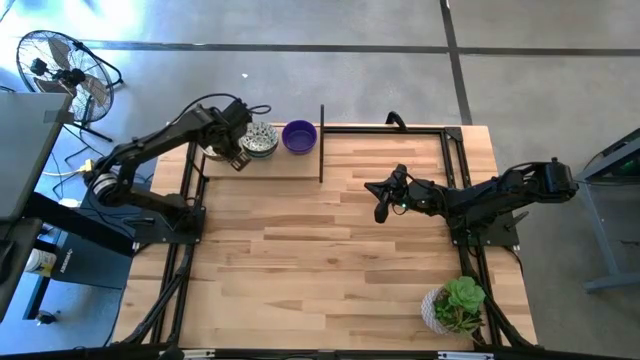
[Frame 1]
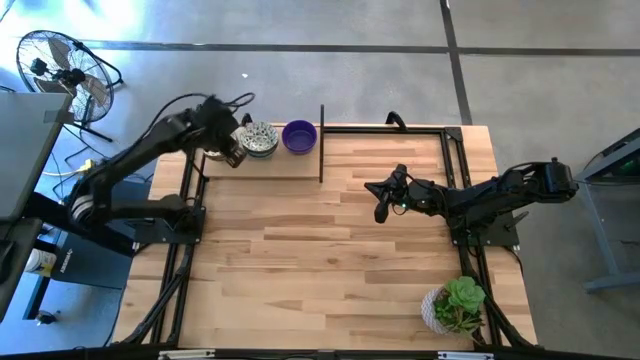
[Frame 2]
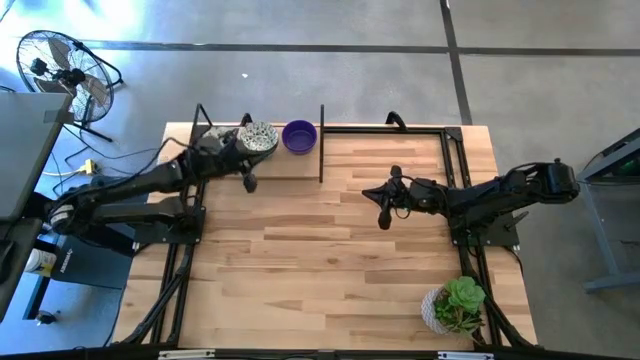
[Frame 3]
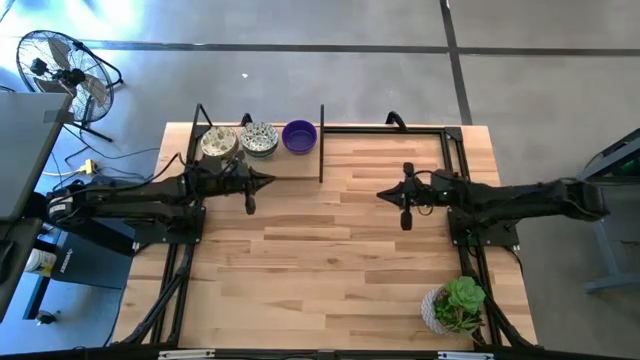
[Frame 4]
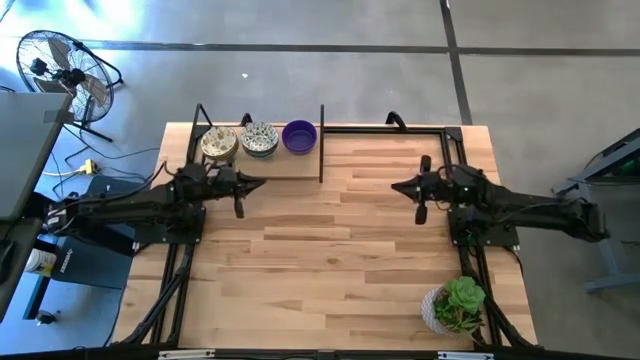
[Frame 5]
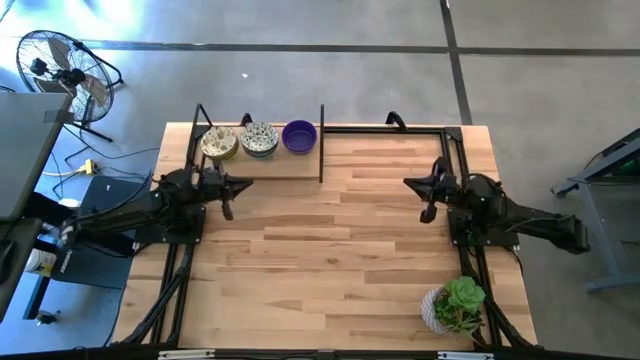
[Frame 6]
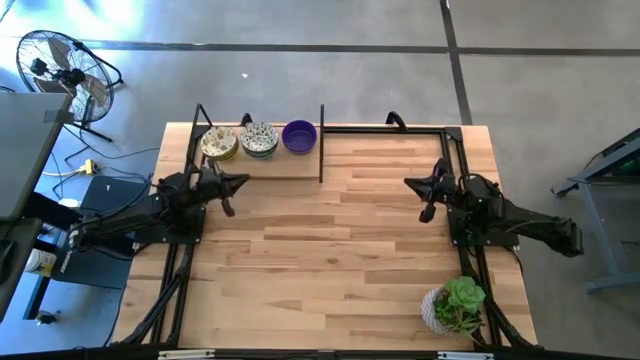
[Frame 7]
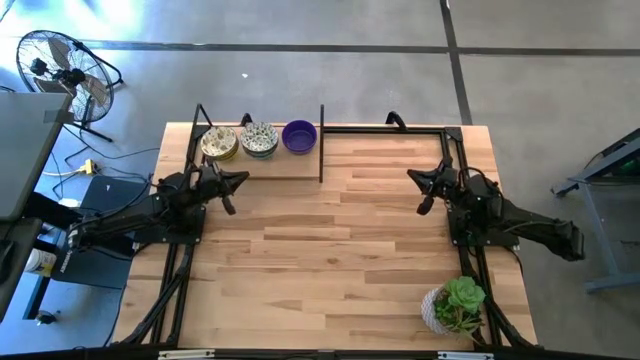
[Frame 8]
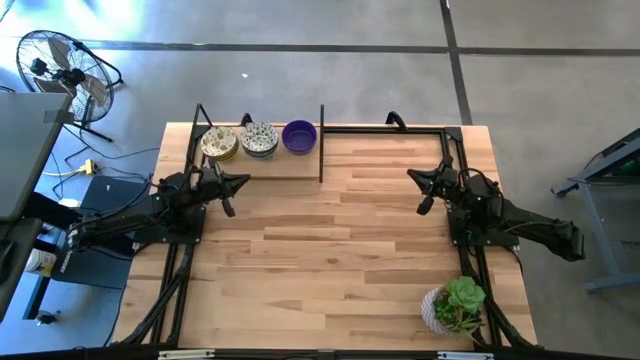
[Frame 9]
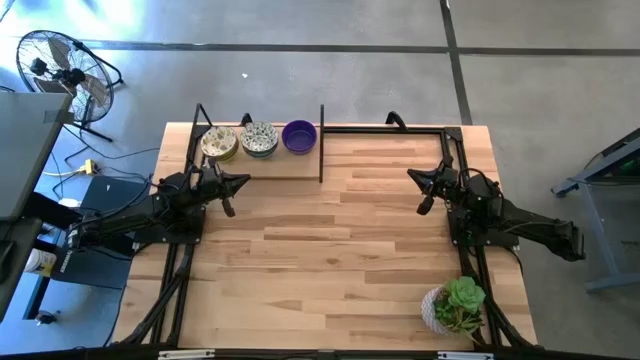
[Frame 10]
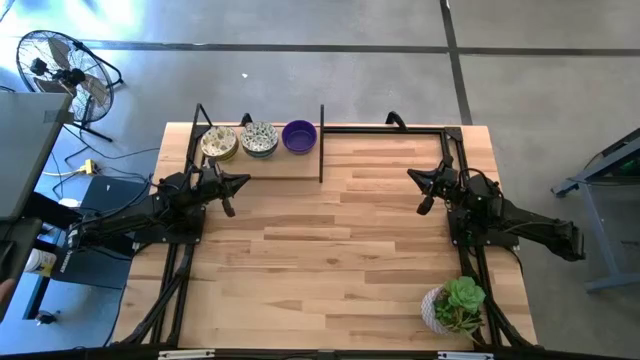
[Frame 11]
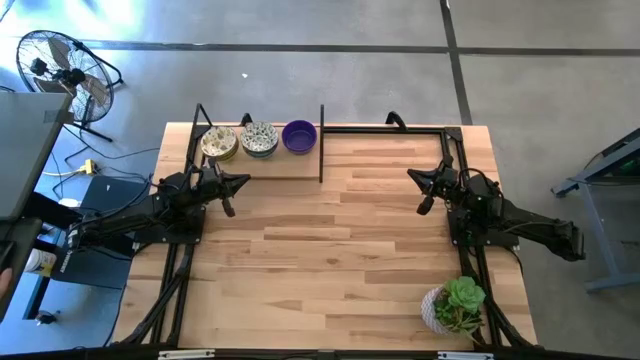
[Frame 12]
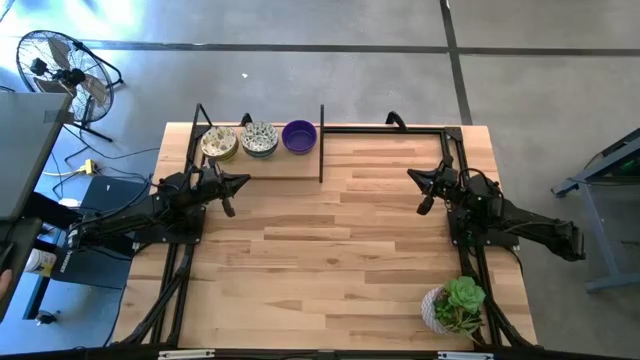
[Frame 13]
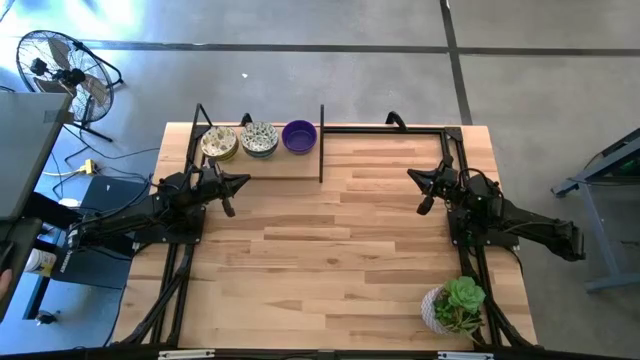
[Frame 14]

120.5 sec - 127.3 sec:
Task: Pick & Place Mini bowls
Return to Home Position

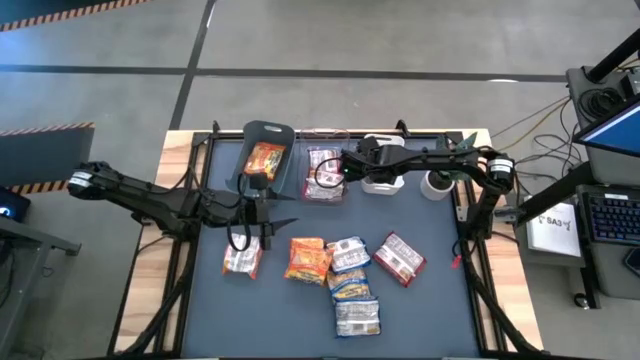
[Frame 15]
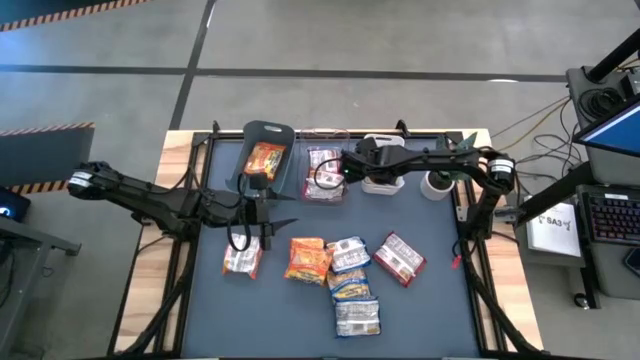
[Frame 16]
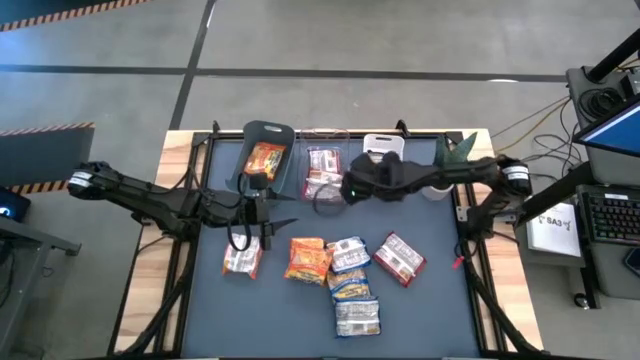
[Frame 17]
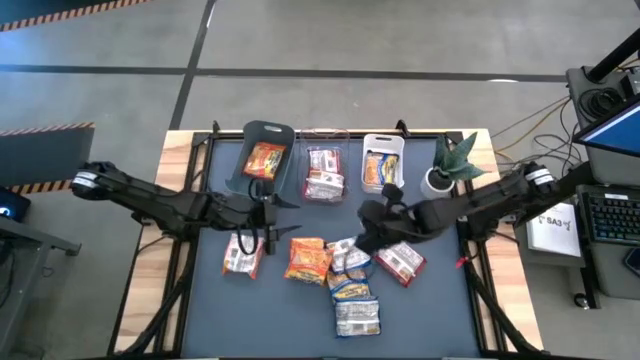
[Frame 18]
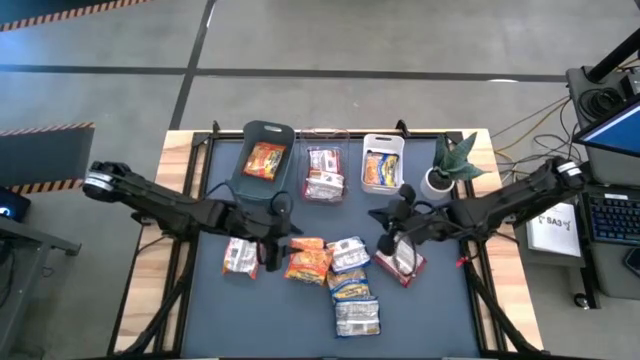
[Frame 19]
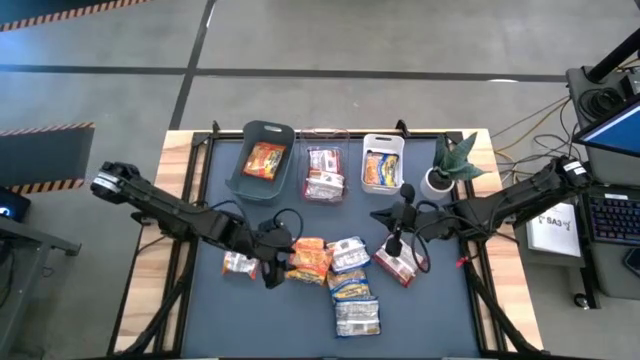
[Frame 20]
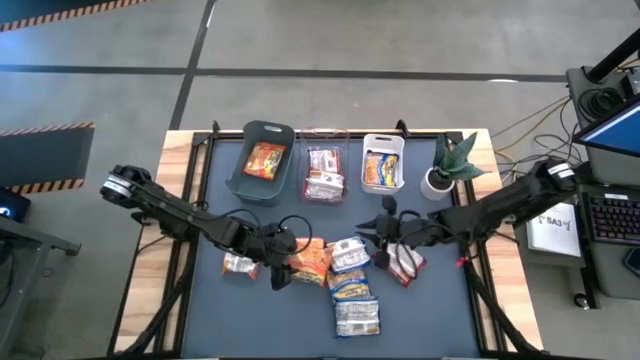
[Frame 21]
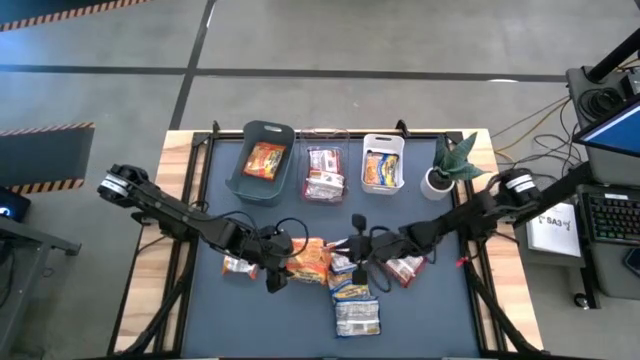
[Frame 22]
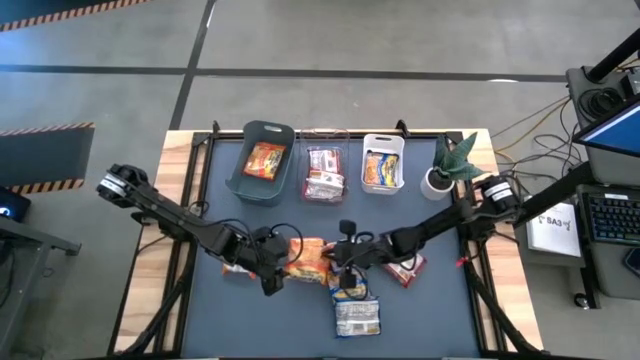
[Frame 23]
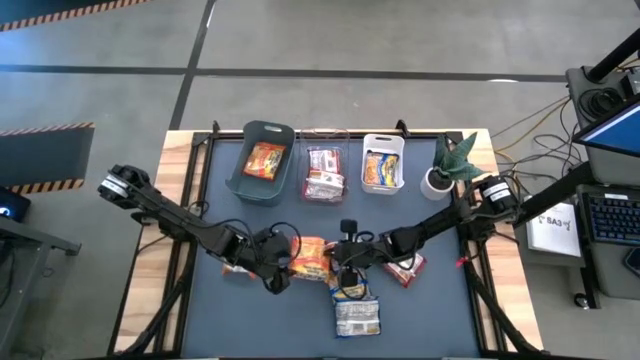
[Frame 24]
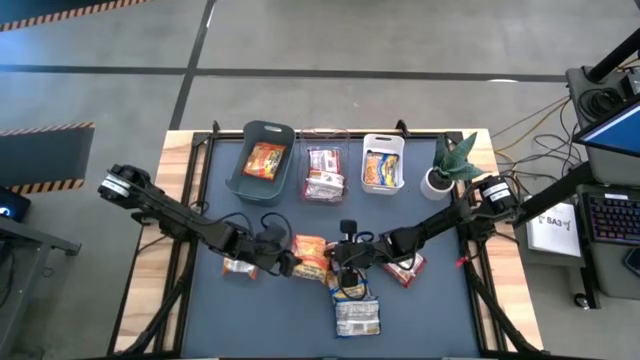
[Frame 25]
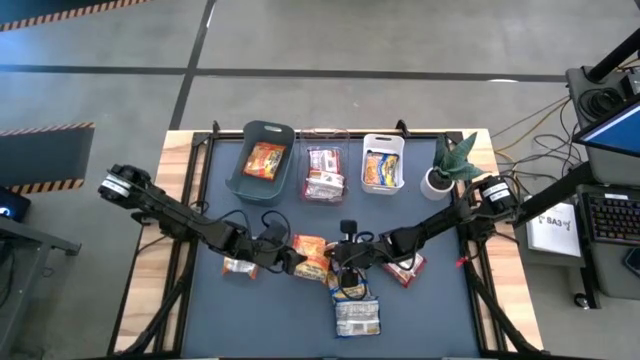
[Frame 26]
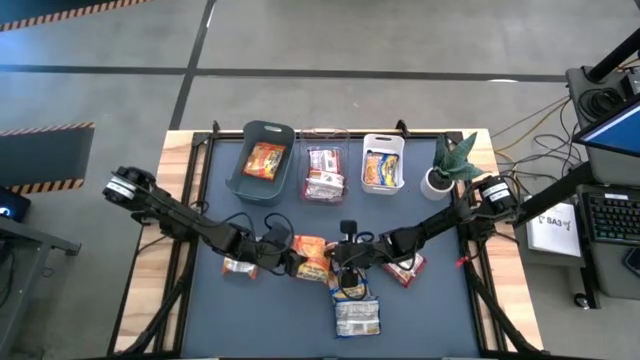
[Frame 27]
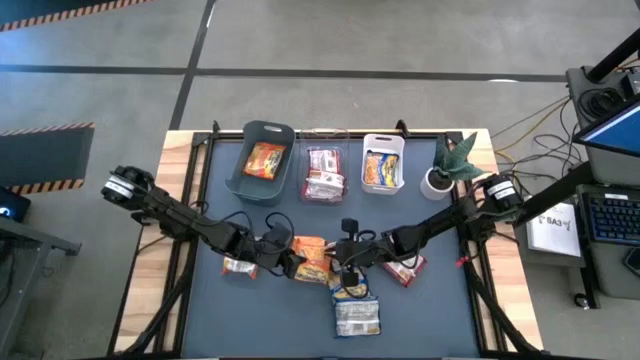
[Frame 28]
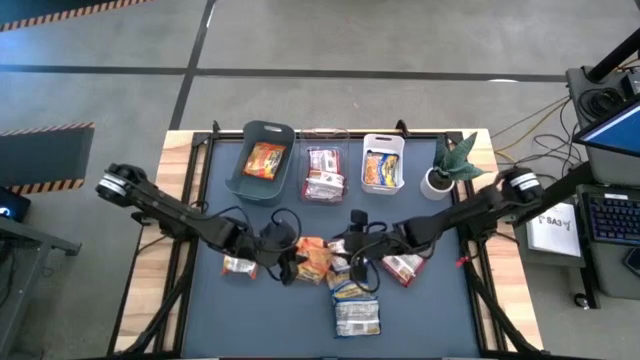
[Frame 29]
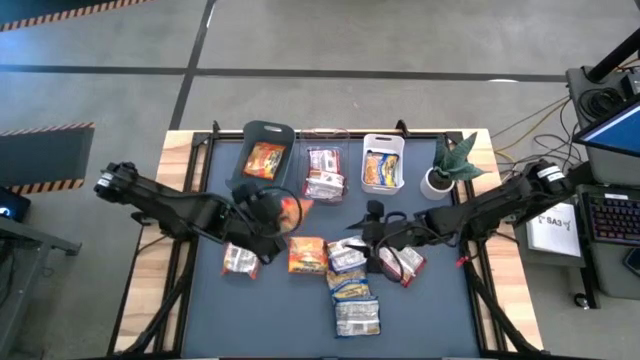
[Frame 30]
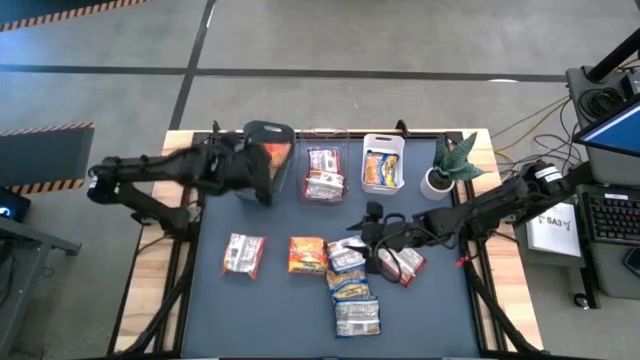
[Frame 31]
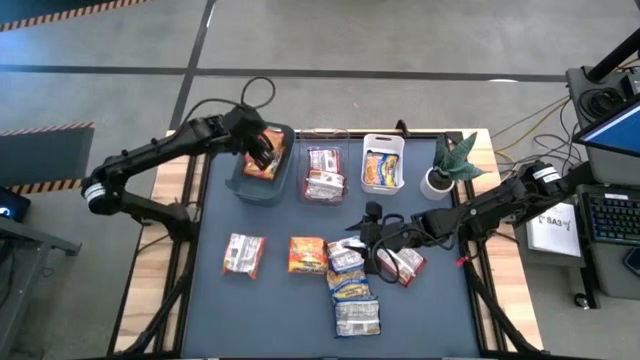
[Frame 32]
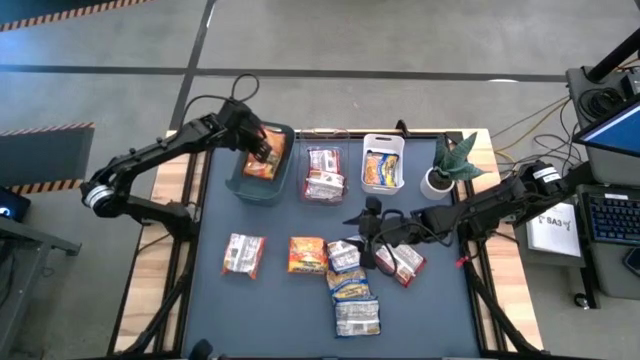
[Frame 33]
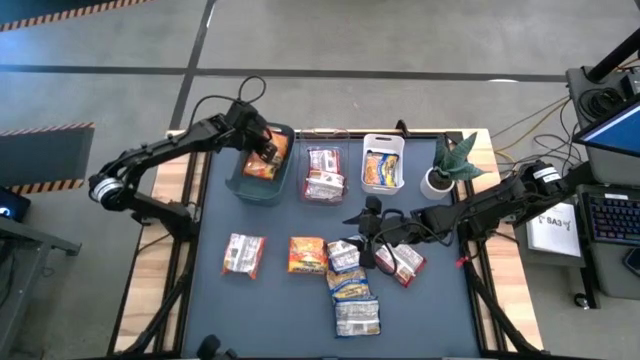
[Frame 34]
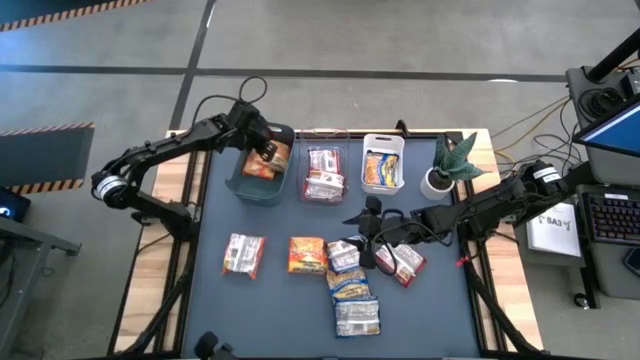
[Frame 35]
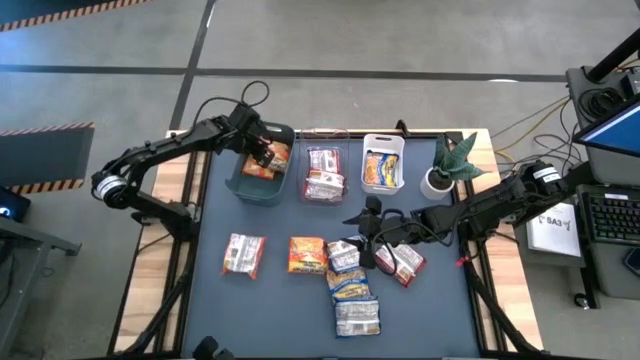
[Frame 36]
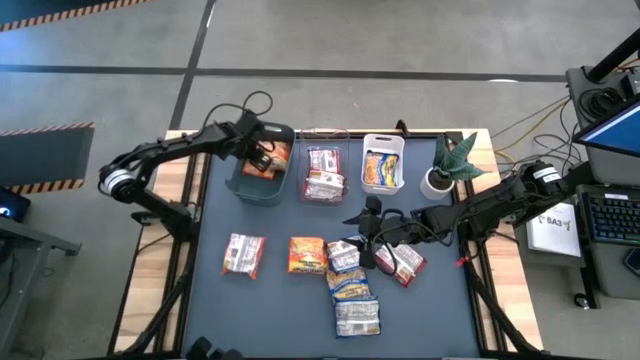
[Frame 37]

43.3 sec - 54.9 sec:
Task: Sort Maruchan noodles
Put the orange noodle pack into the dark green bin
